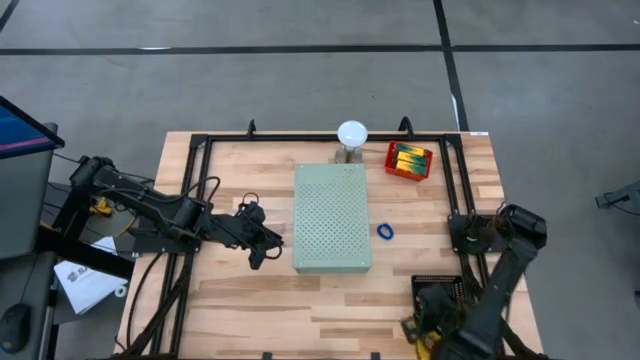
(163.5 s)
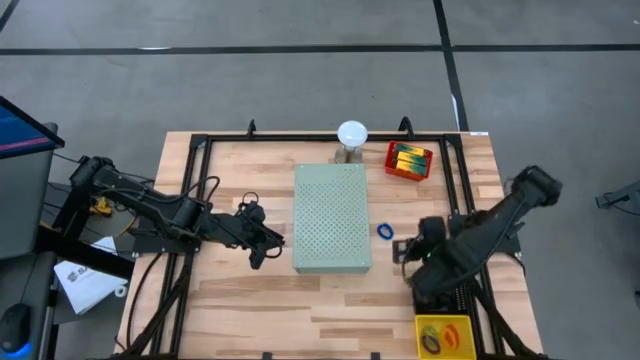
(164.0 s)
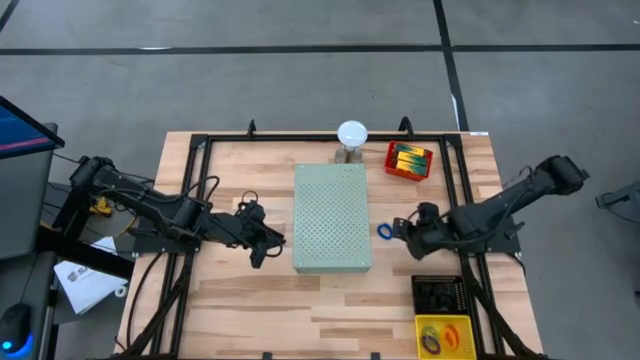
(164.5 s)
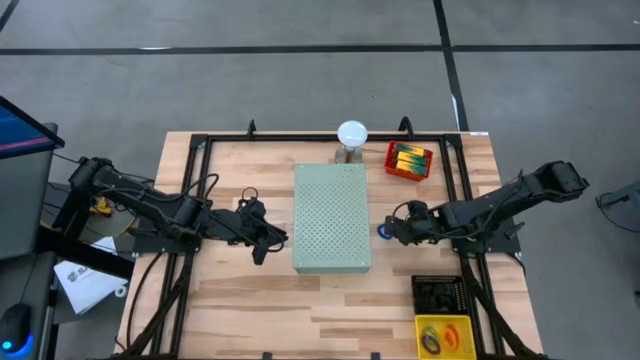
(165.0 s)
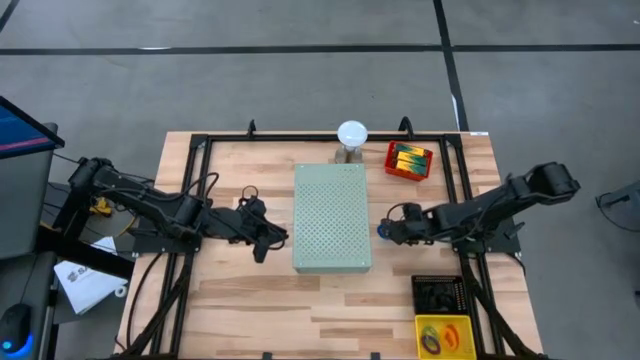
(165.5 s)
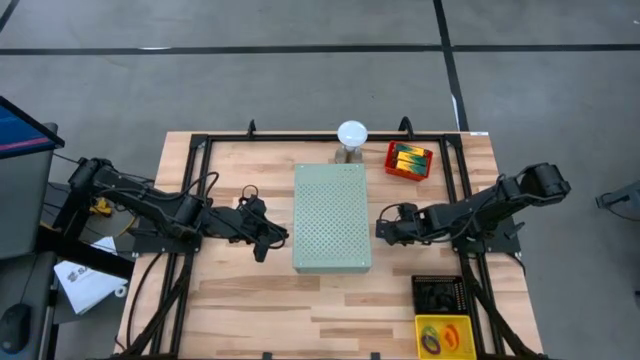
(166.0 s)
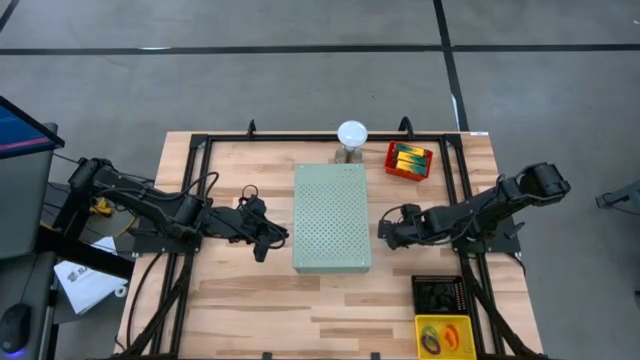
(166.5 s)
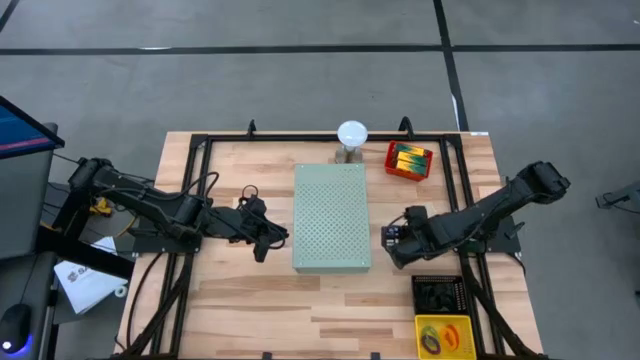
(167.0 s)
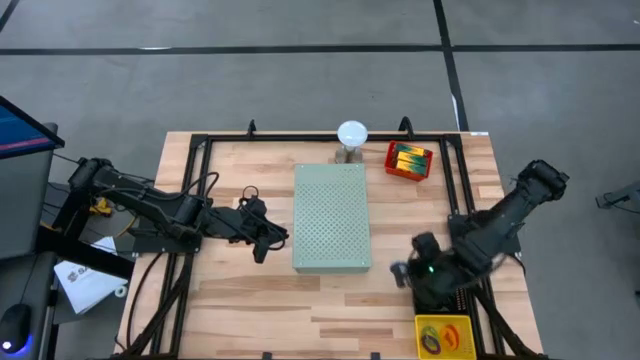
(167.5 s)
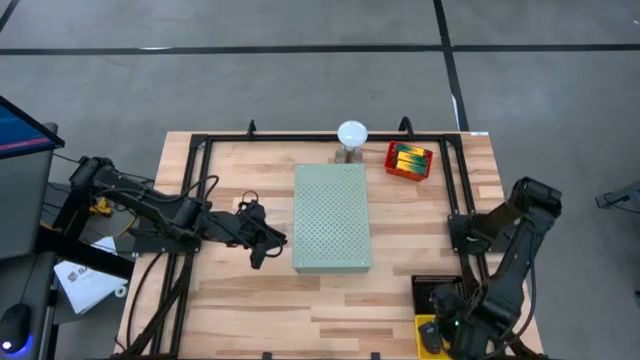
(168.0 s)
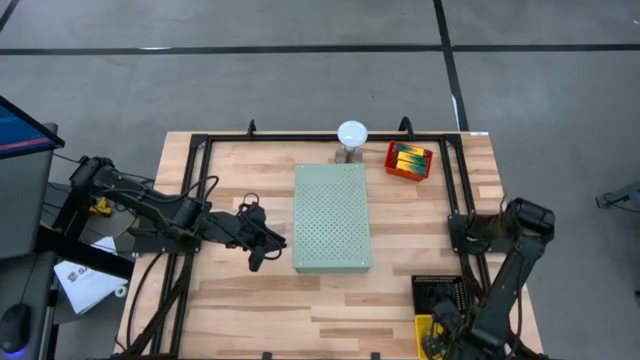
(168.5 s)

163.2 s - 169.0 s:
Task: Pick & Place Office Desk Supplies
Put the blue spring keychain into the yellow bin

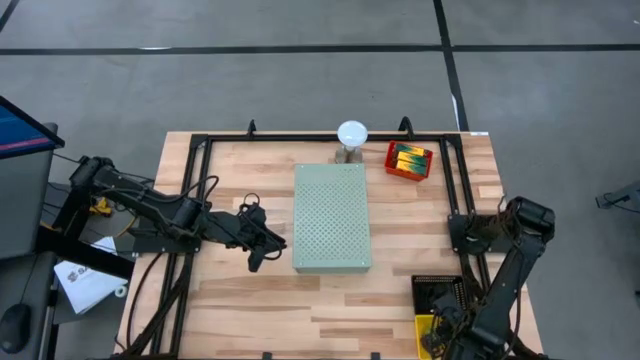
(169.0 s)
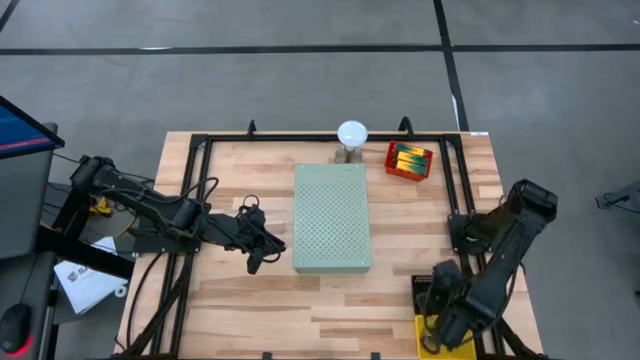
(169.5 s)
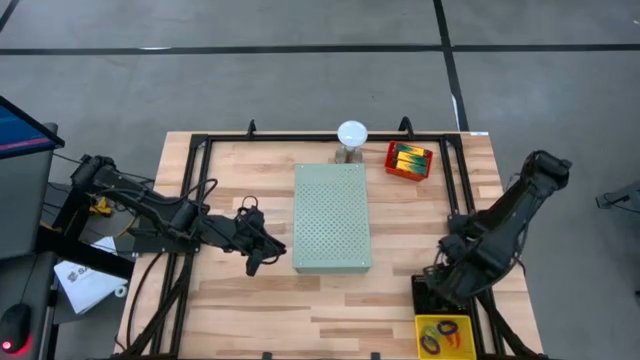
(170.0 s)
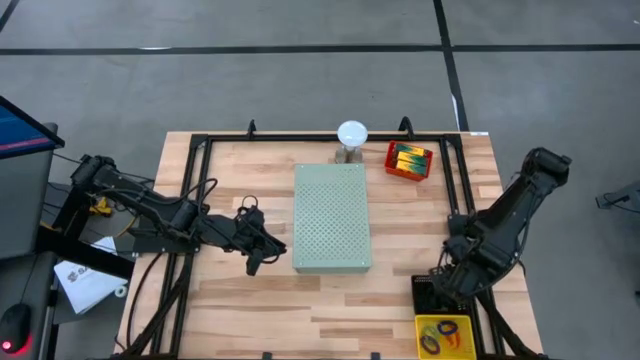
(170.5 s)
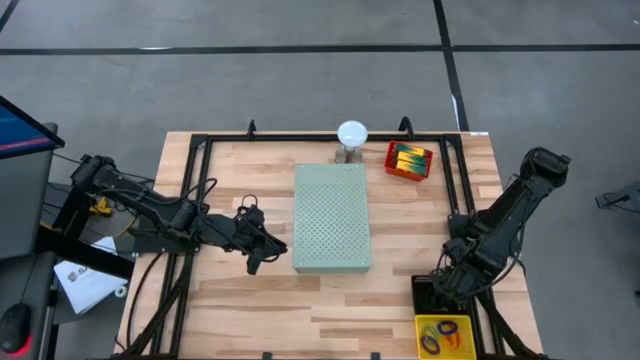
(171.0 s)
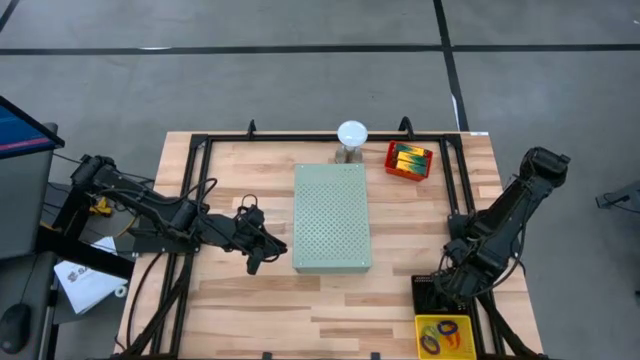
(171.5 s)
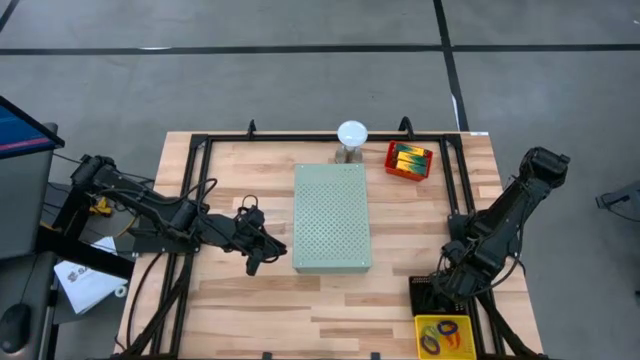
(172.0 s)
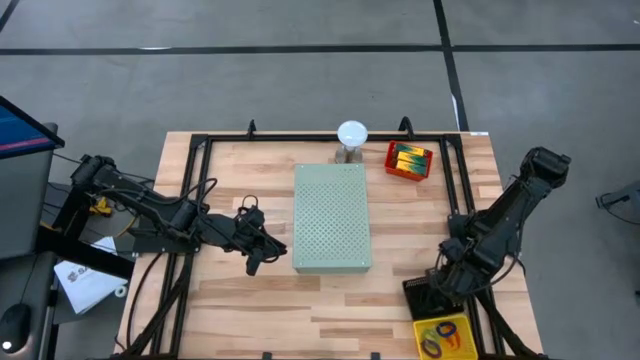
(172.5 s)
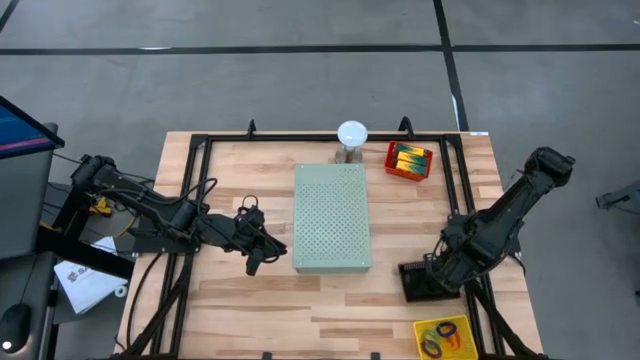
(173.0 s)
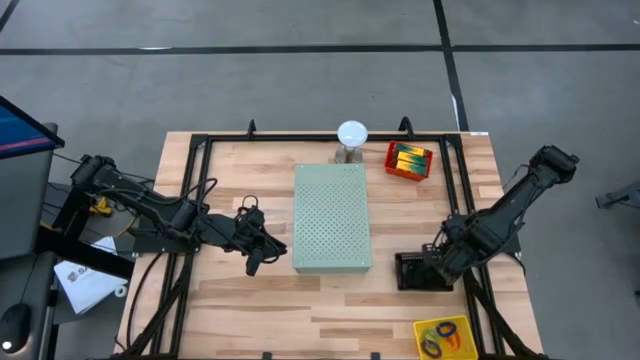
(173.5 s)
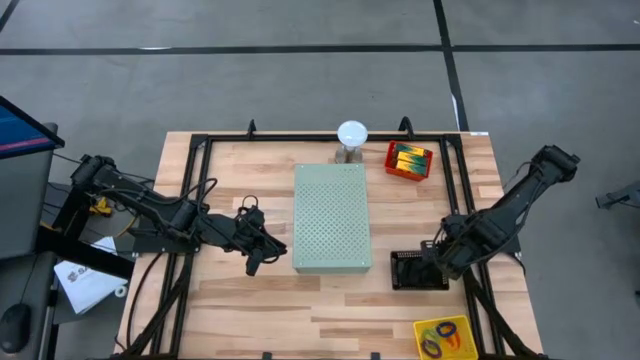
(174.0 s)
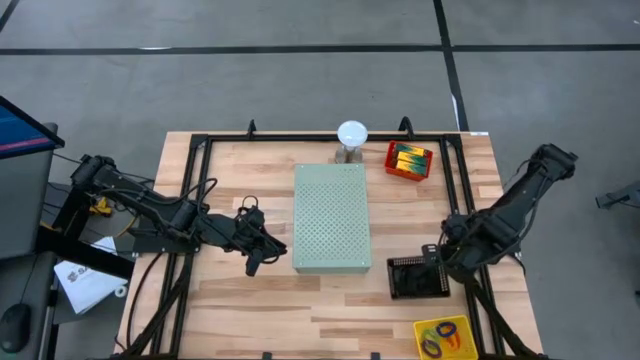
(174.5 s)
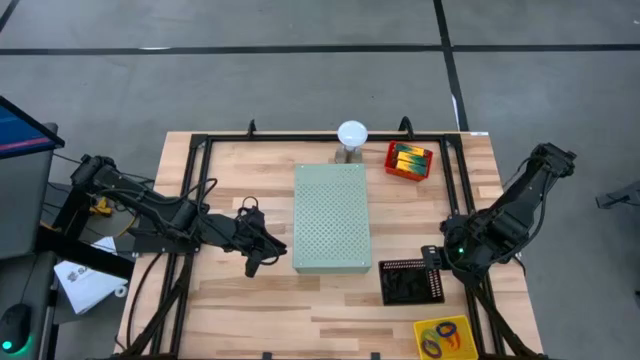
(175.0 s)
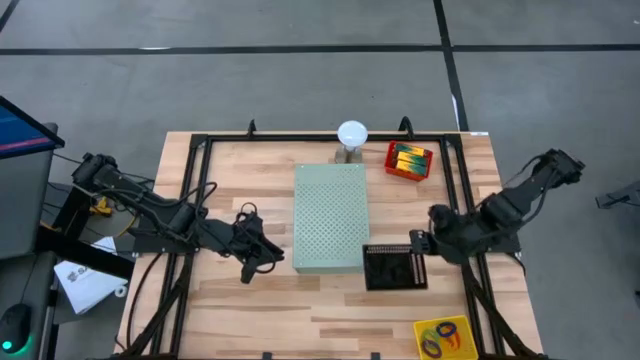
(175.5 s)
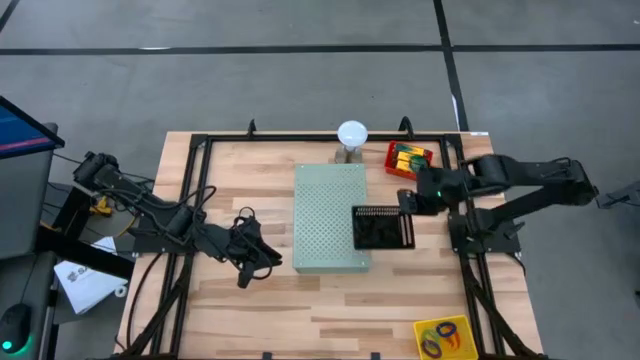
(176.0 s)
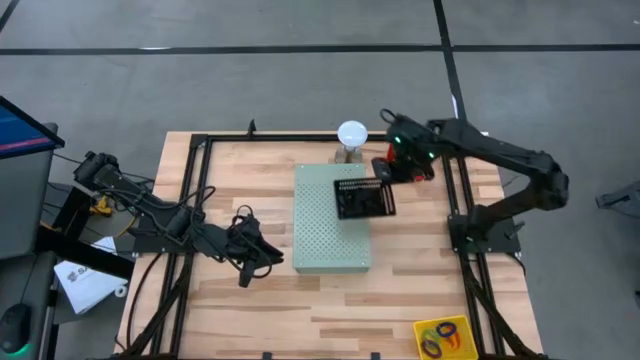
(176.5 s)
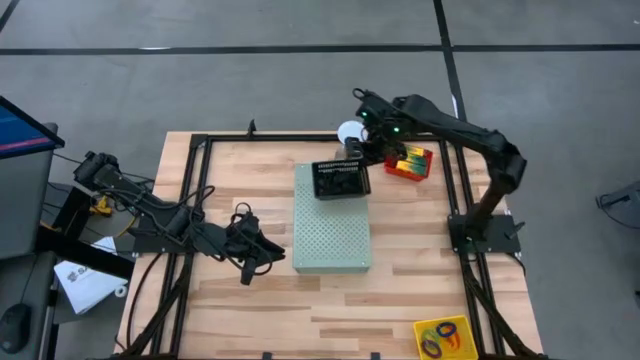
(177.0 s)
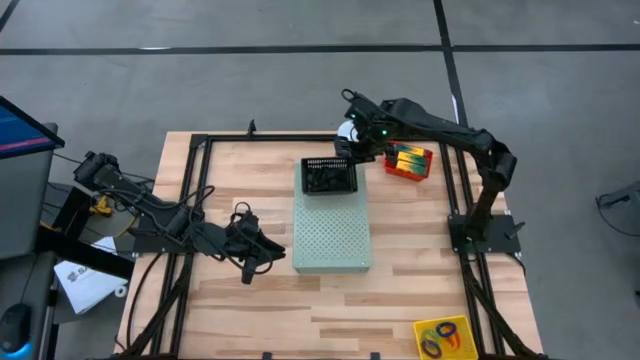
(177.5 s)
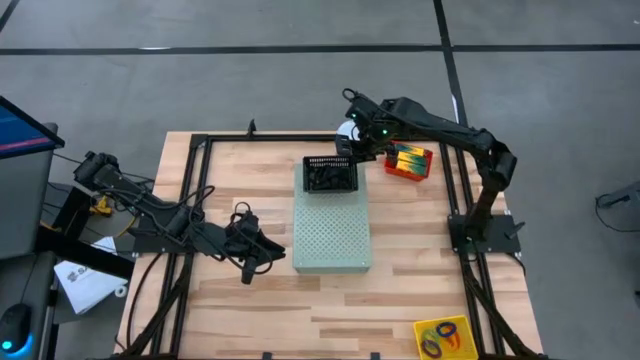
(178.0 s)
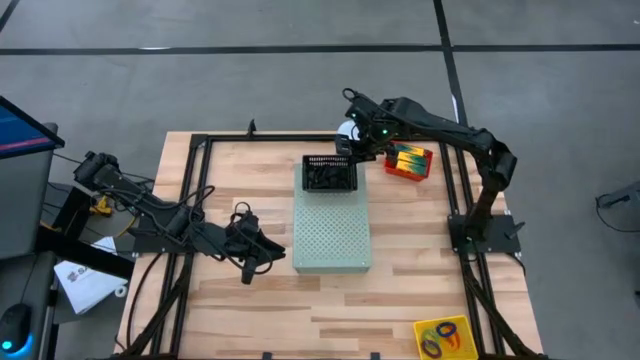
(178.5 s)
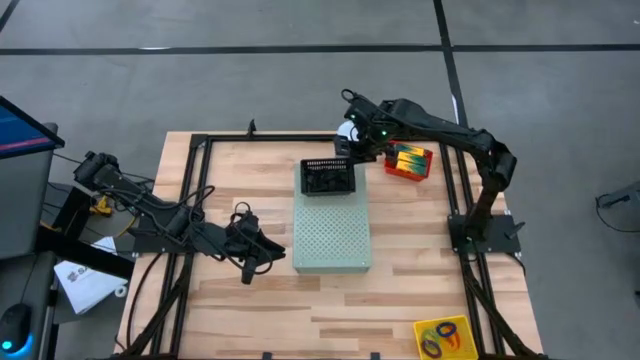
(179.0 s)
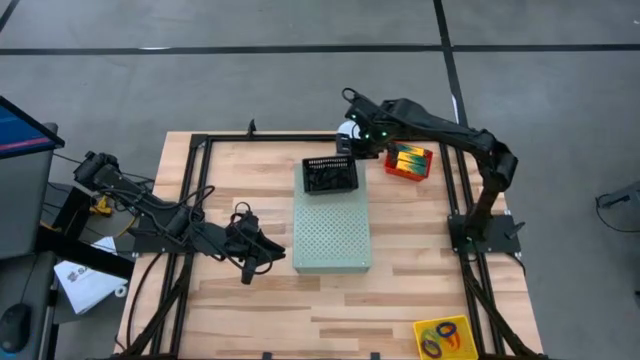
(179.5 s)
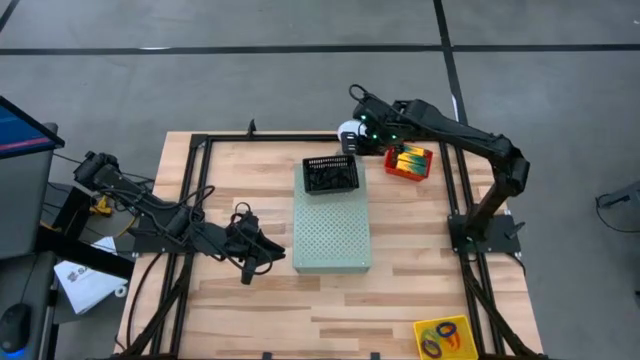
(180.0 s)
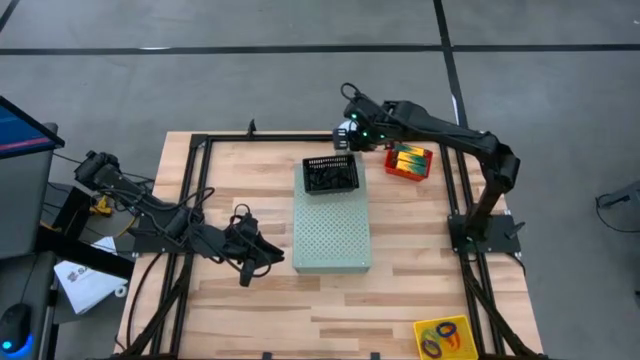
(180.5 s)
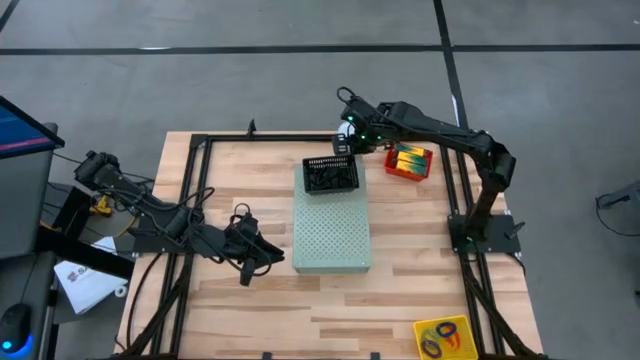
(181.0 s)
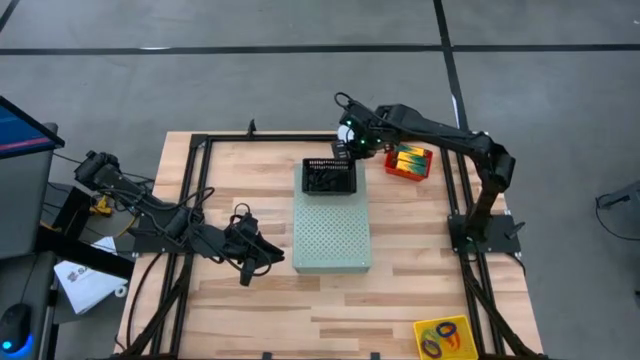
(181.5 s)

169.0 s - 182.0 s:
Put the black bin on the shelf
